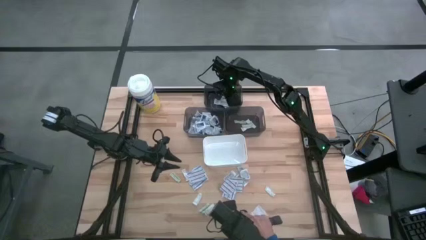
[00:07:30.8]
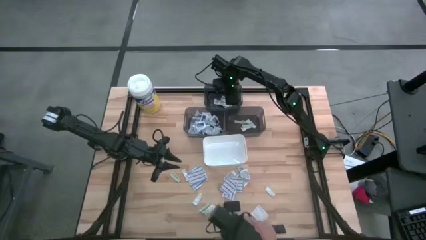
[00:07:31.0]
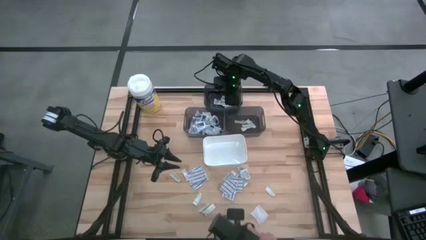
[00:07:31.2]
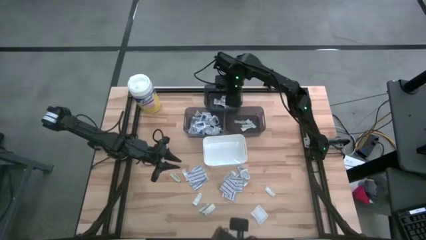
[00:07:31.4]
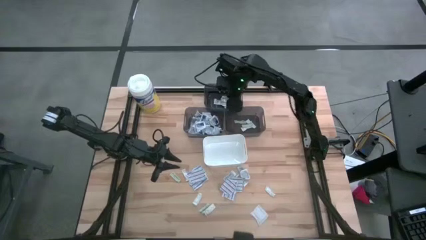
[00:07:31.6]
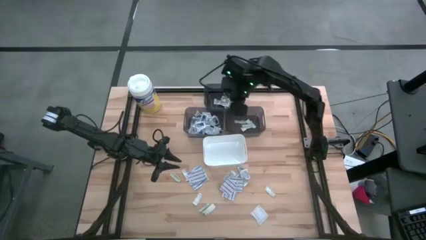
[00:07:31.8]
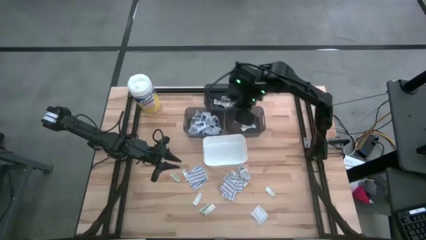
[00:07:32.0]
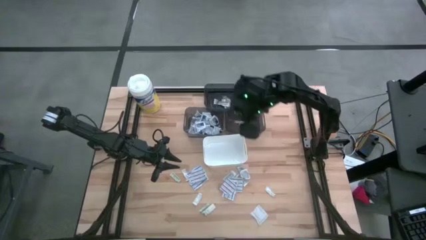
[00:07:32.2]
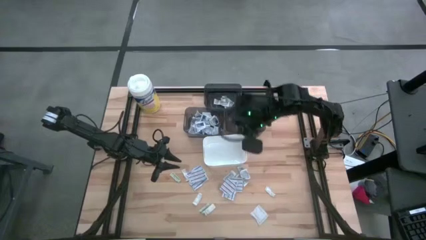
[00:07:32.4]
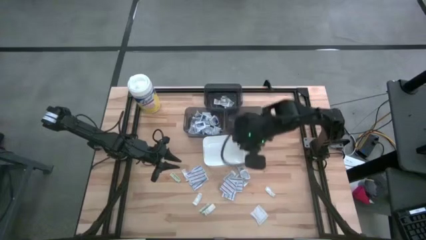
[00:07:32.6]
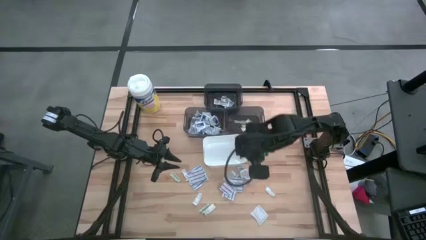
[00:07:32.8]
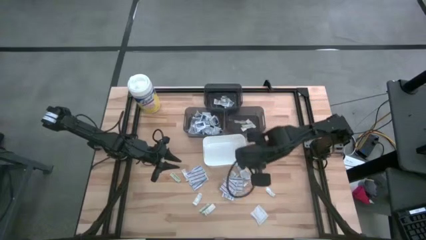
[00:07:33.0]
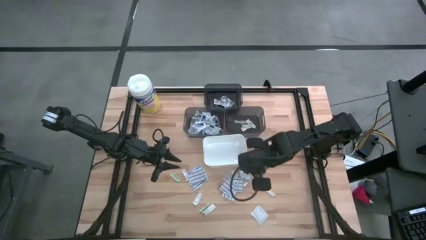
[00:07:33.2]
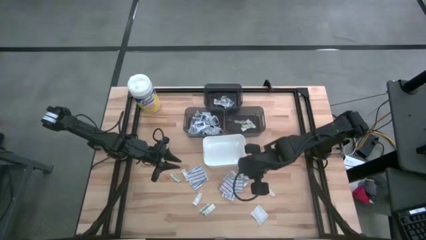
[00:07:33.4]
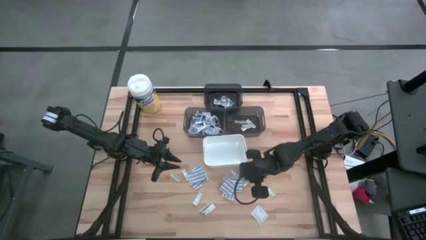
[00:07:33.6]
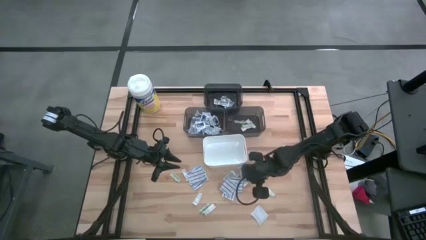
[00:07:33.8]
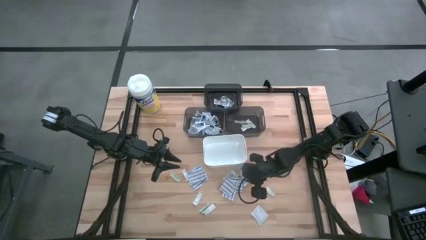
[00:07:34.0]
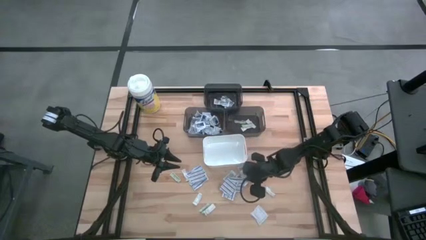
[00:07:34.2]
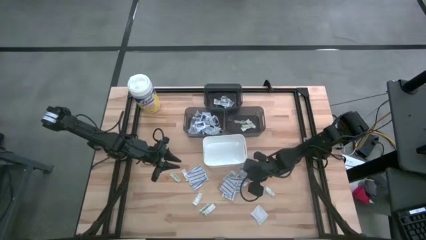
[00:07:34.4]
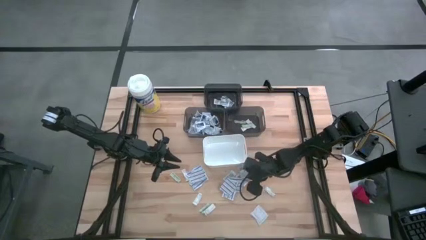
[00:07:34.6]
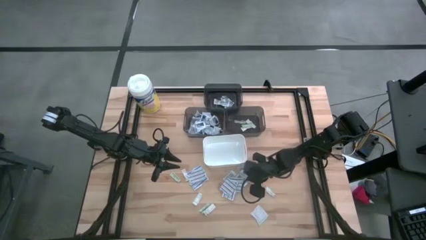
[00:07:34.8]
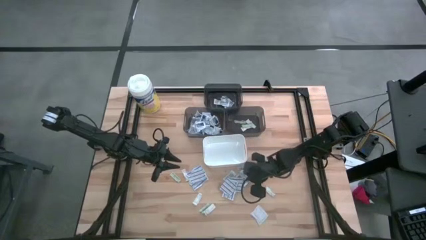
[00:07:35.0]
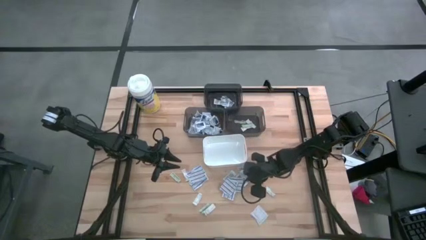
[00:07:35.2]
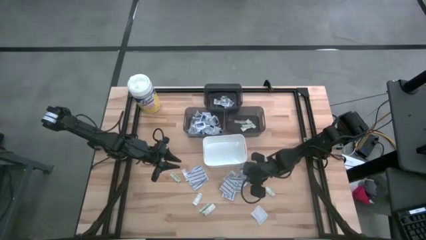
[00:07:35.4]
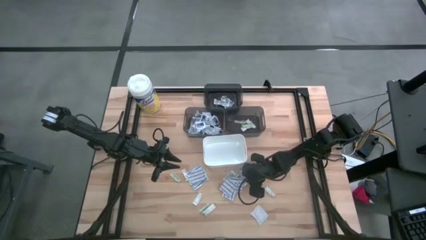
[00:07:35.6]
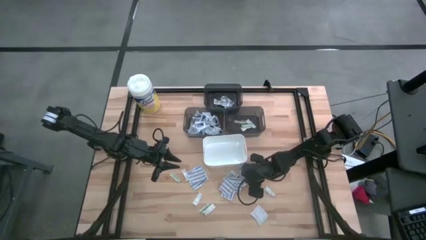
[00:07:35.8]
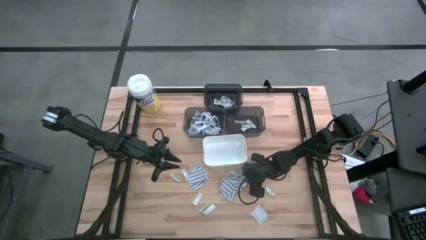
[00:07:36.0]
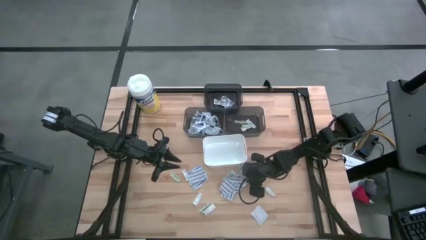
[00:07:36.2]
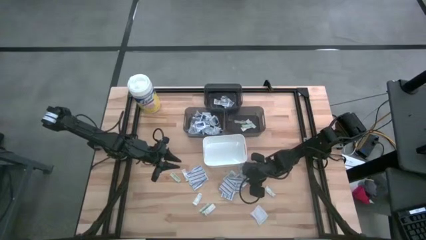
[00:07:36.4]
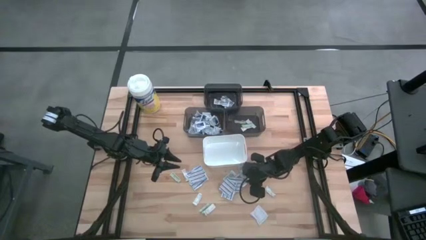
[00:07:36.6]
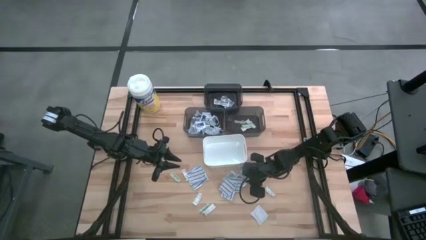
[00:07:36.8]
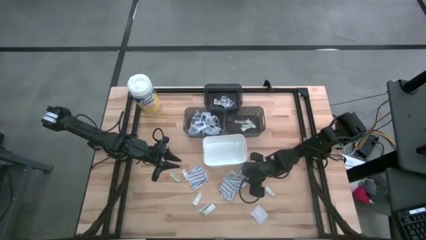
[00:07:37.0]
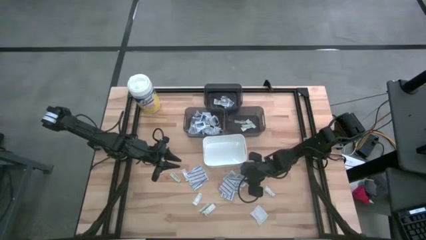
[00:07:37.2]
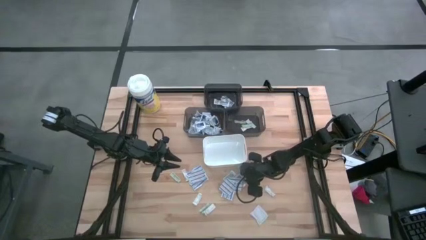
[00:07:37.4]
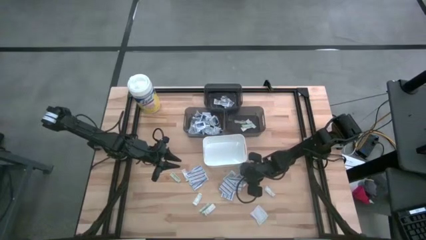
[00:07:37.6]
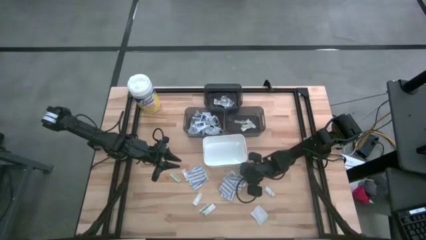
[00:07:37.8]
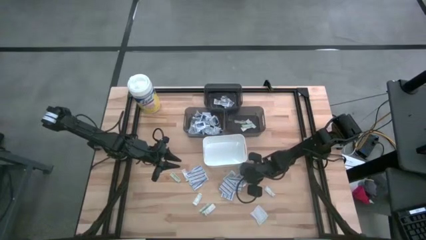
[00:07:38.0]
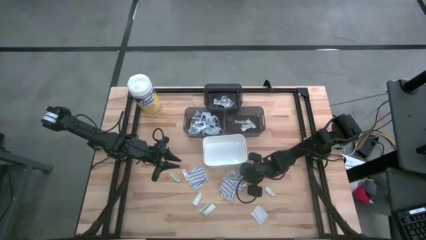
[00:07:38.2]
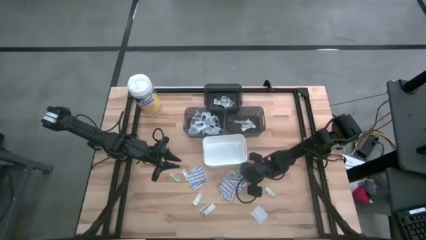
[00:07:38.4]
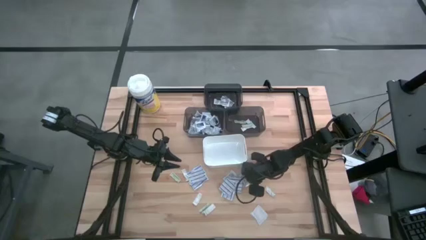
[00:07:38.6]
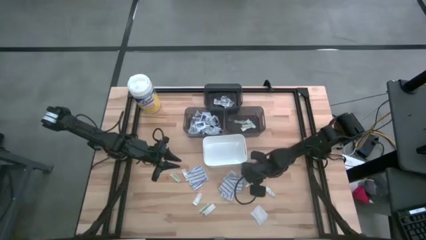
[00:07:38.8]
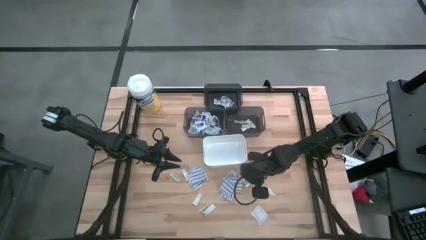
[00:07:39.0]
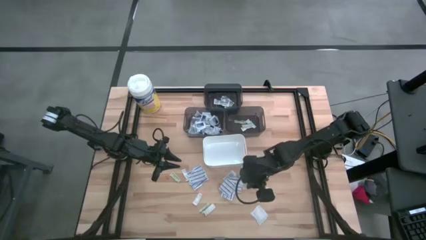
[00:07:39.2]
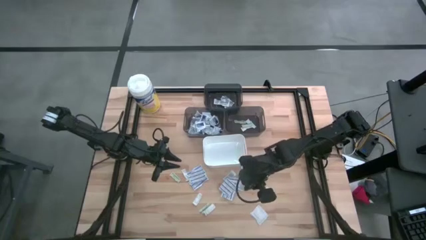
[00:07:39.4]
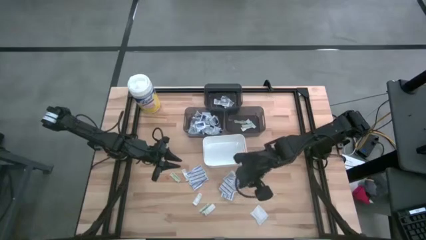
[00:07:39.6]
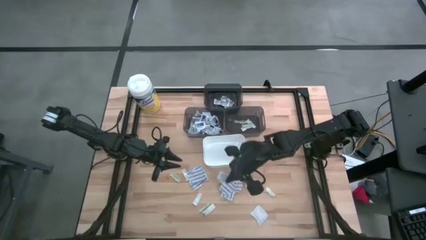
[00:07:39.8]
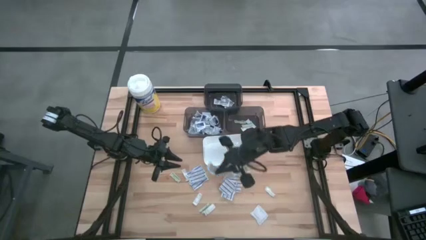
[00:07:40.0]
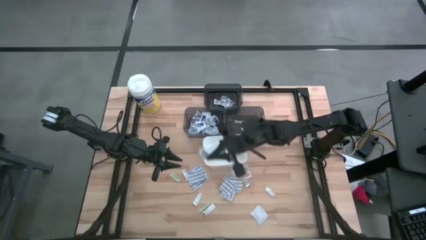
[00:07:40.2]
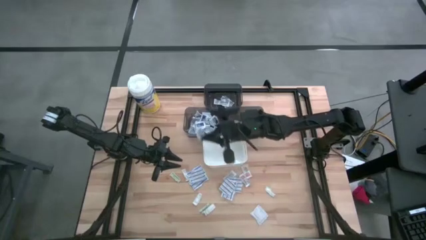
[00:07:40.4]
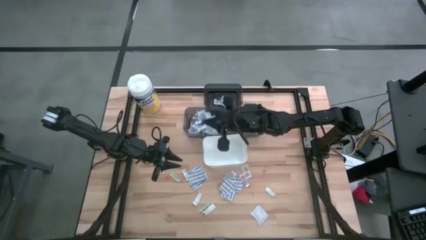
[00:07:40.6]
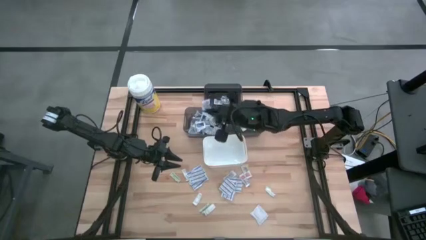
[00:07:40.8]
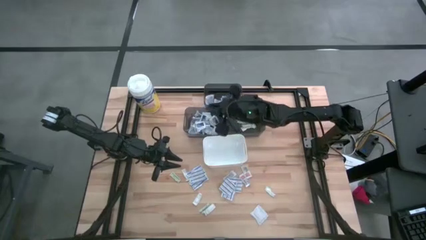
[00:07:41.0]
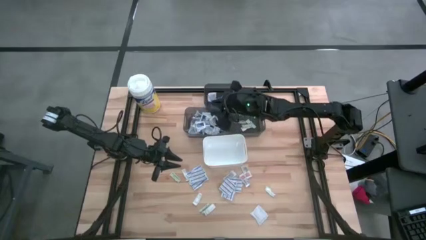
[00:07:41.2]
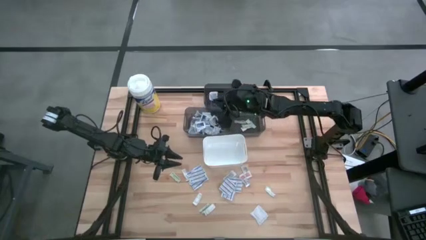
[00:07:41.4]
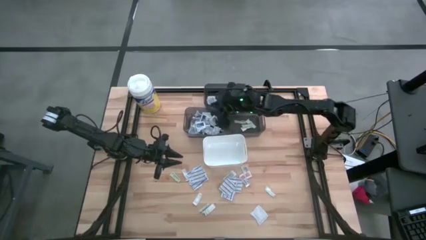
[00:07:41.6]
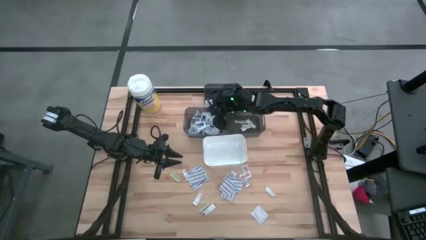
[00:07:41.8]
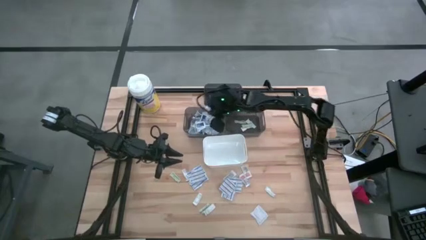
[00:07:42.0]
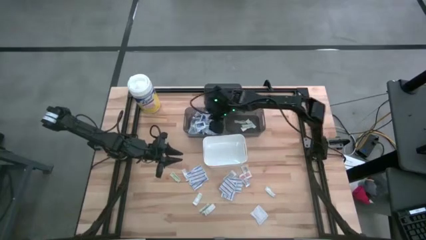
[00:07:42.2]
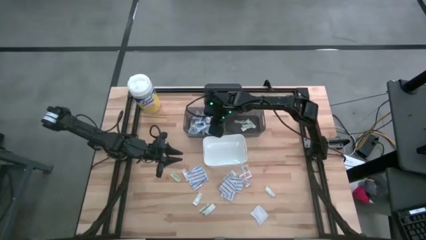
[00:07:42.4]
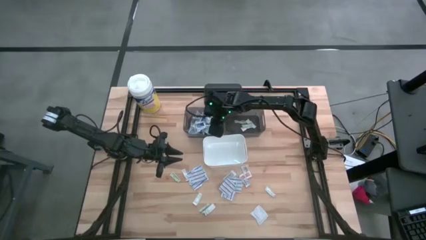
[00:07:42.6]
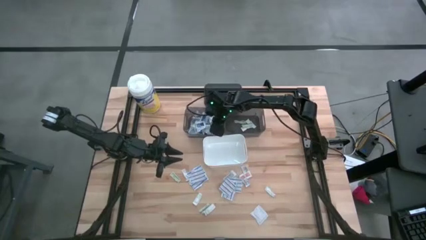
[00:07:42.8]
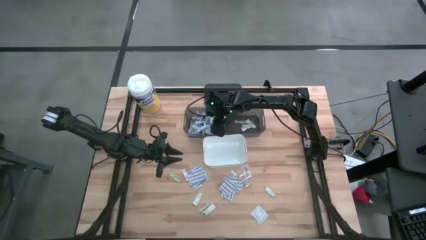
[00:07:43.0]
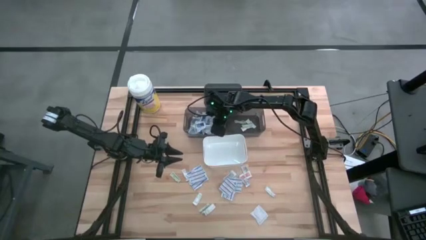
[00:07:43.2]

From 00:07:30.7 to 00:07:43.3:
Task: Pick & Place First Aid Supplies
Put the alcohol pad into the bottom left black bin

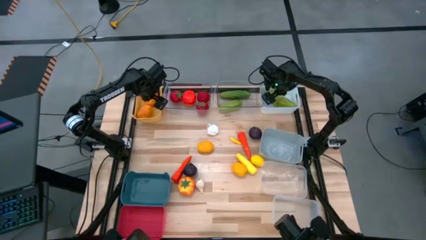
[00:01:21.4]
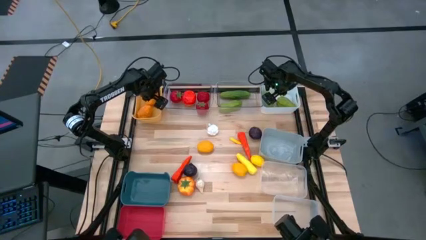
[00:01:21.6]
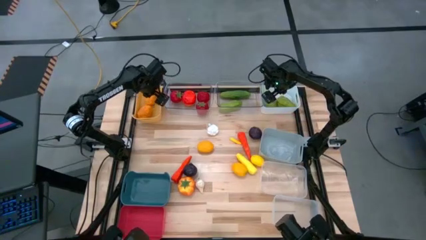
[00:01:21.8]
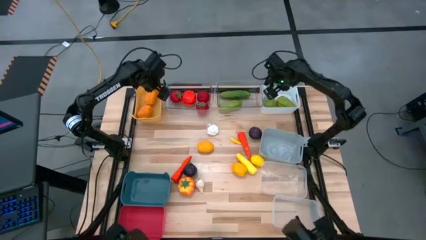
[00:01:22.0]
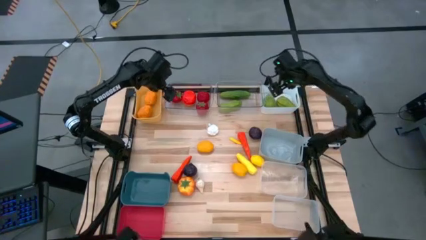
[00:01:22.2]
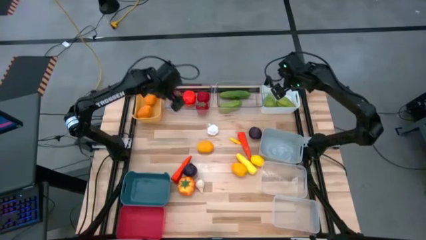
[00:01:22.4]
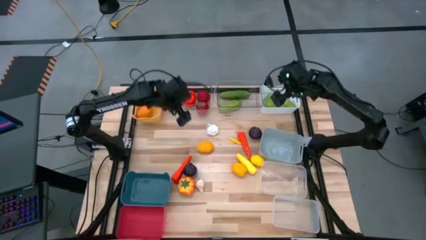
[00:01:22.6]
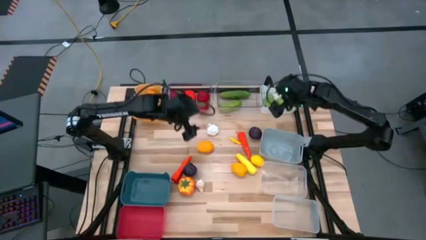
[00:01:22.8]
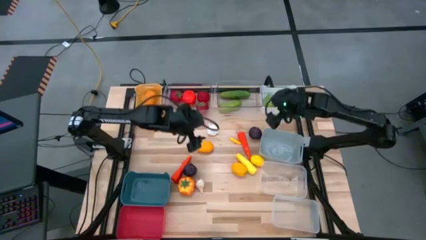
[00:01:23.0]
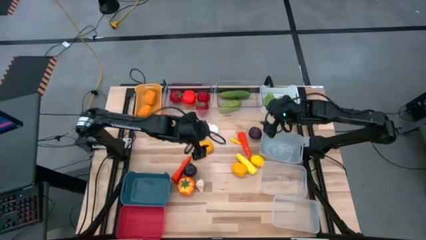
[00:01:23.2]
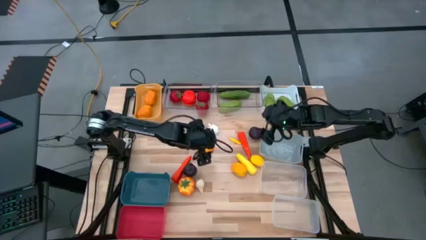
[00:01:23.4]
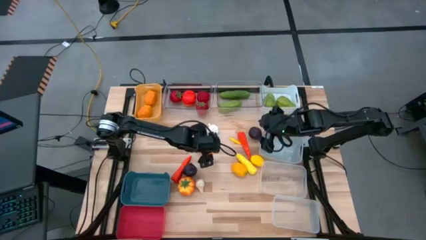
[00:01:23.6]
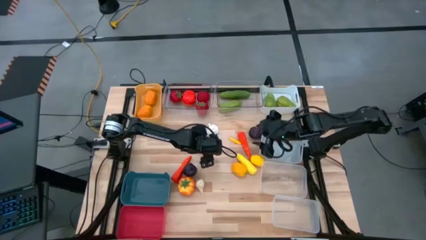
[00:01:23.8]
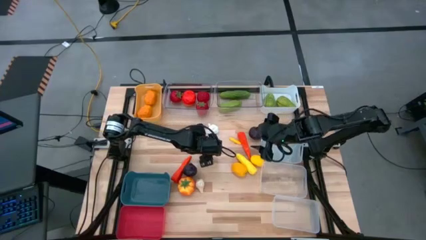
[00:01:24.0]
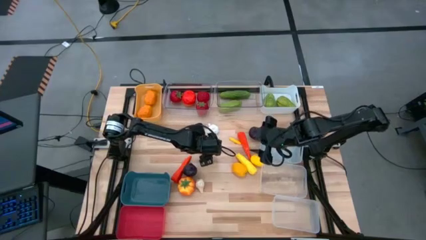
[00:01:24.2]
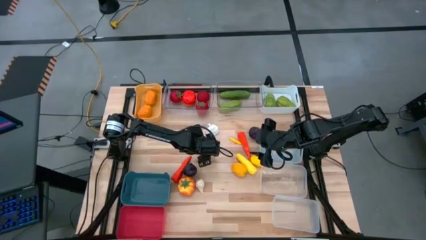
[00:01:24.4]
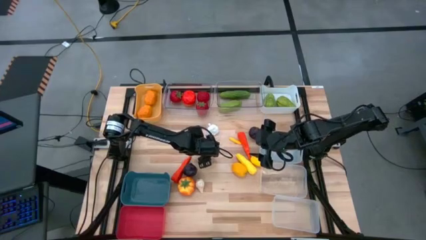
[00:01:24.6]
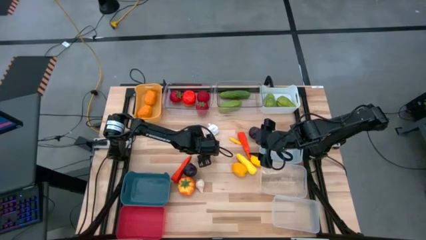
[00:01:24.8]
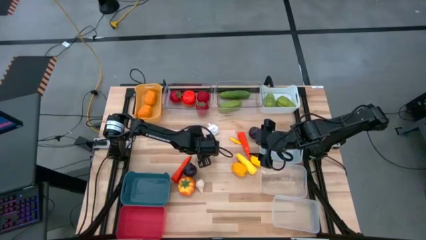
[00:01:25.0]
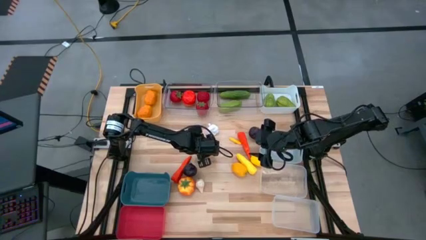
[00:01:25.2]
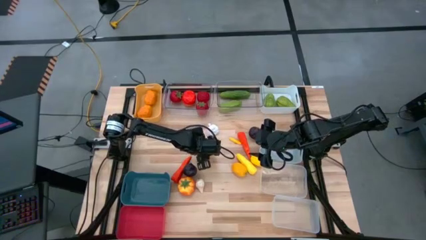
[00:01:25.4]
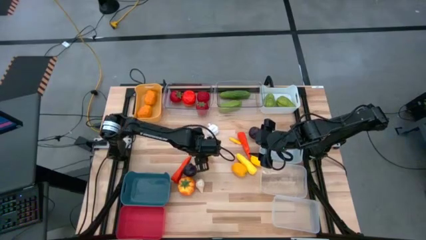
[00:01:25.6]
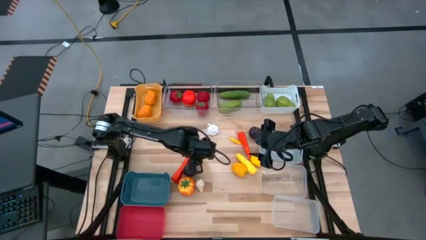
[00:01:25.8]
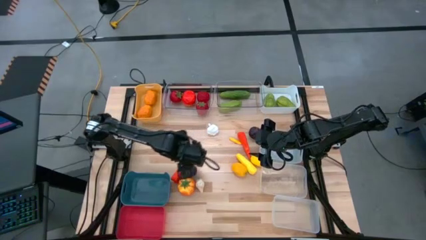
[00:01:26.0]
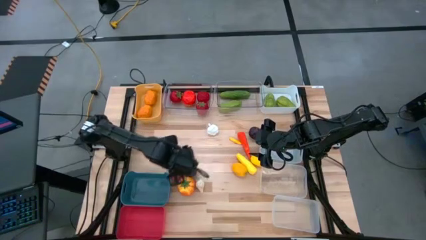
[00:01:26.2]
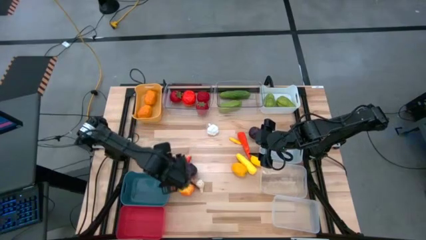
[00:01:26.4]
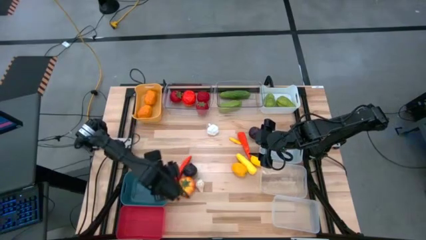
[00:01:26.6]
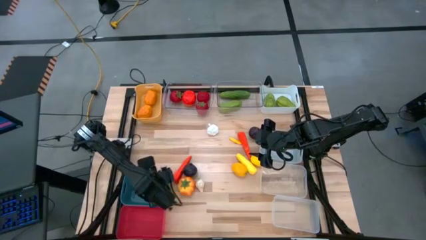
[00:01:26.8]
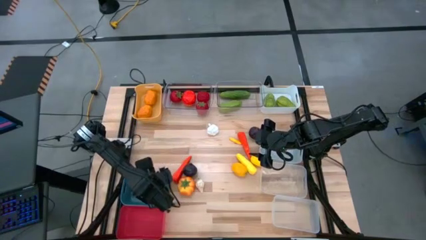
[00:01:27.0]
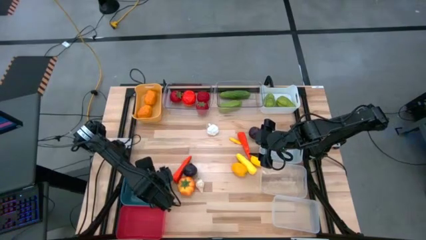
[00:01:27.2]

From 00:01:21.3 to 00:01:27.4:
Task: Sort produce into baskets
Put the yellow lemon into the blue bin
